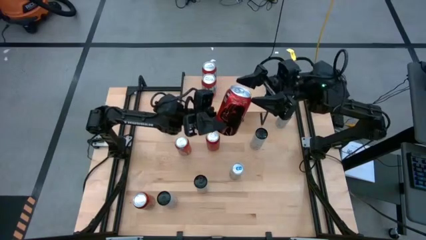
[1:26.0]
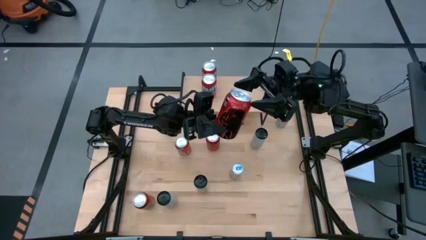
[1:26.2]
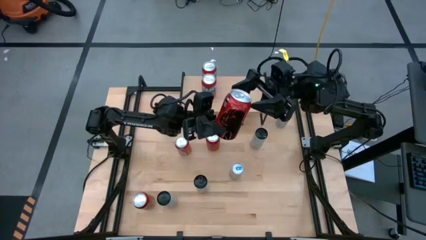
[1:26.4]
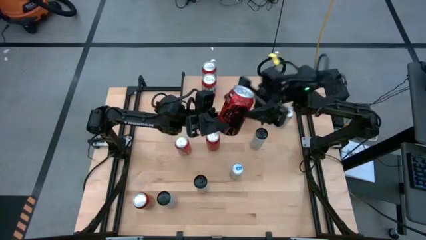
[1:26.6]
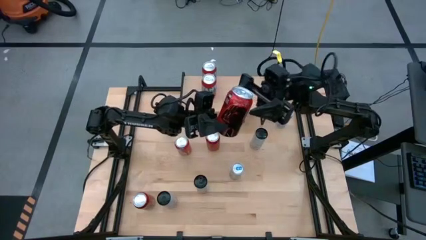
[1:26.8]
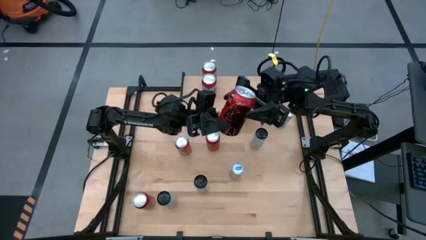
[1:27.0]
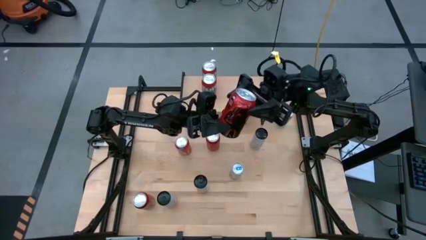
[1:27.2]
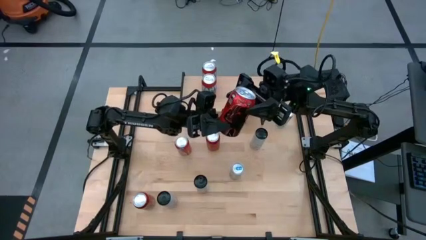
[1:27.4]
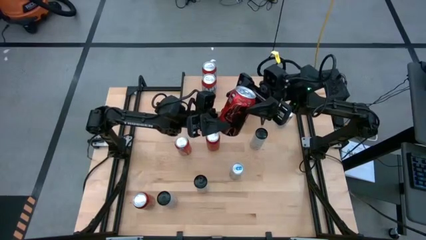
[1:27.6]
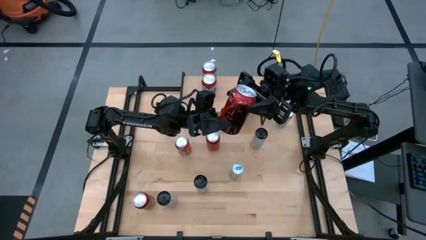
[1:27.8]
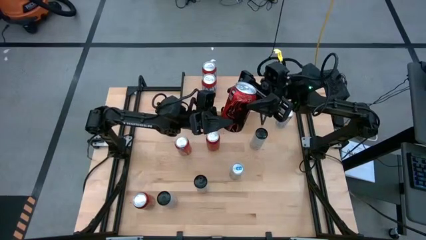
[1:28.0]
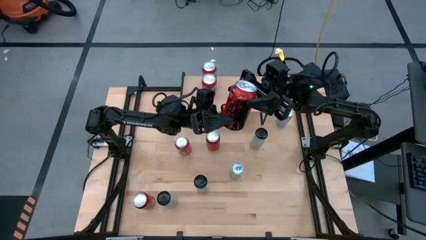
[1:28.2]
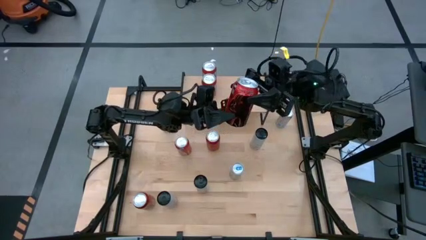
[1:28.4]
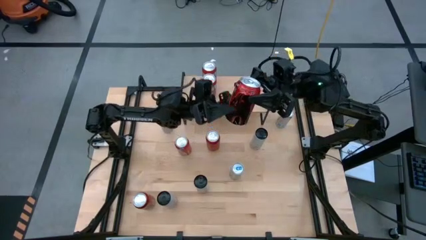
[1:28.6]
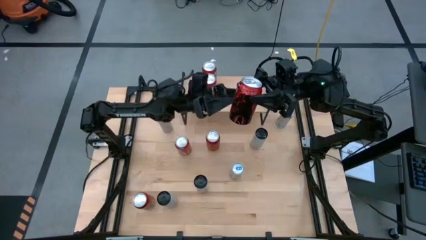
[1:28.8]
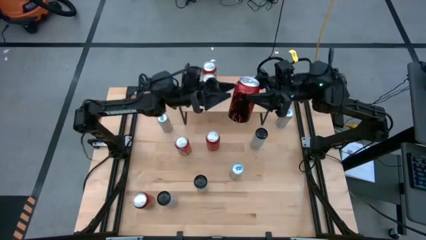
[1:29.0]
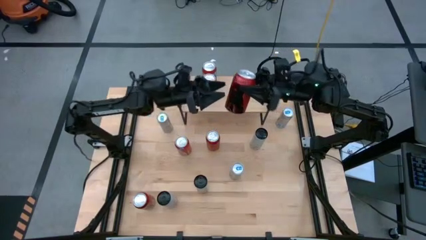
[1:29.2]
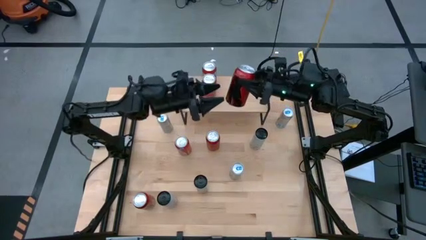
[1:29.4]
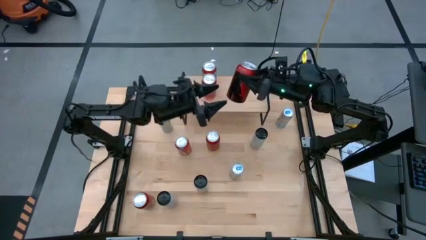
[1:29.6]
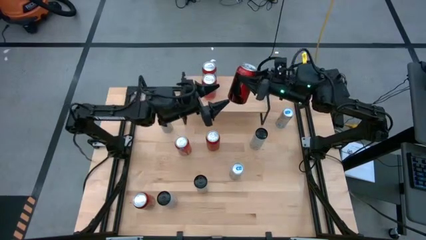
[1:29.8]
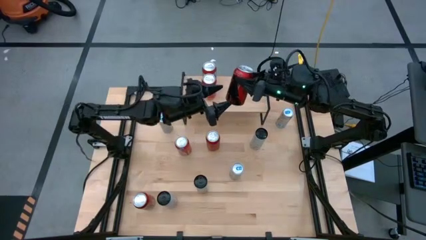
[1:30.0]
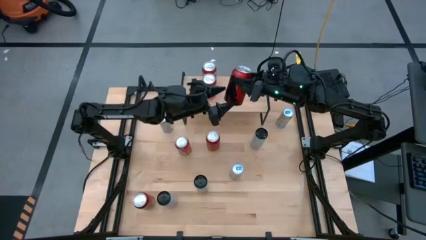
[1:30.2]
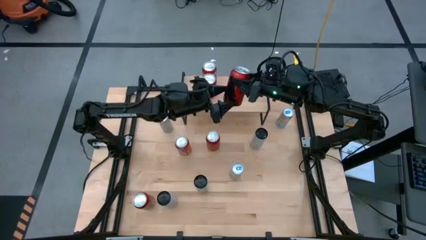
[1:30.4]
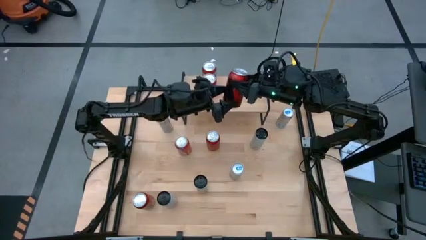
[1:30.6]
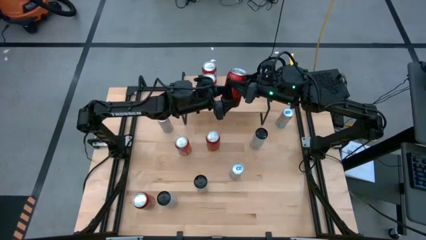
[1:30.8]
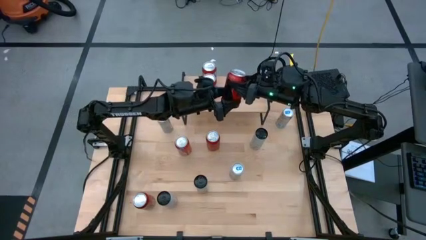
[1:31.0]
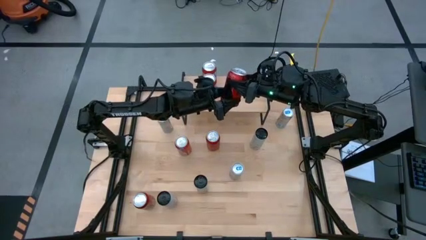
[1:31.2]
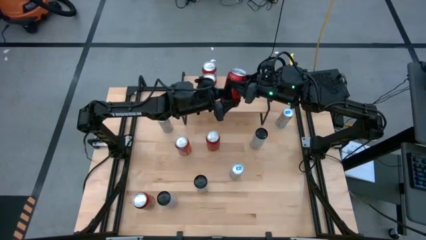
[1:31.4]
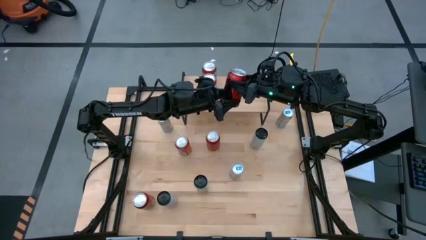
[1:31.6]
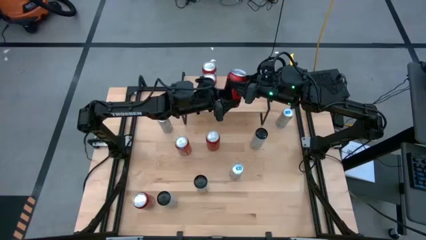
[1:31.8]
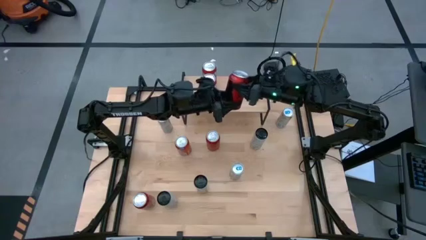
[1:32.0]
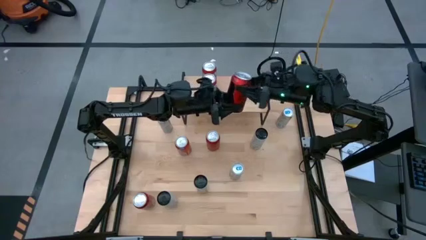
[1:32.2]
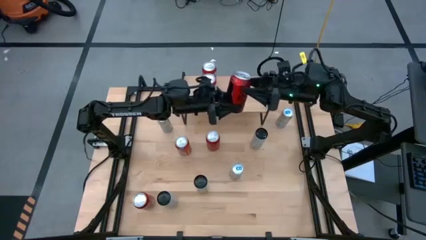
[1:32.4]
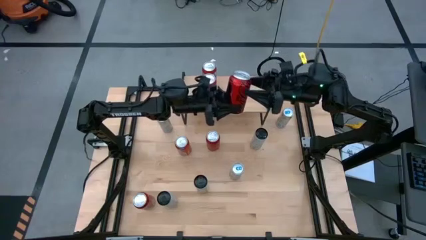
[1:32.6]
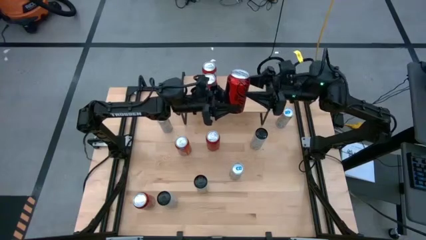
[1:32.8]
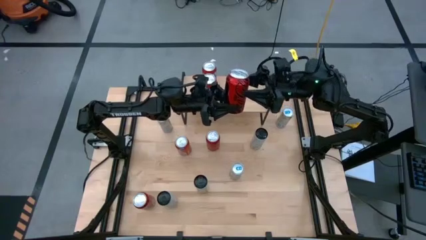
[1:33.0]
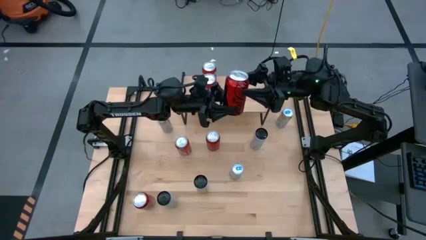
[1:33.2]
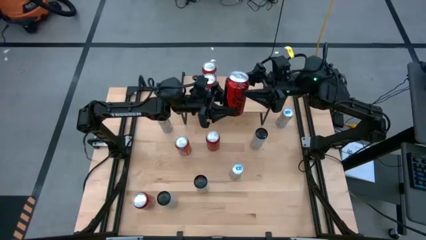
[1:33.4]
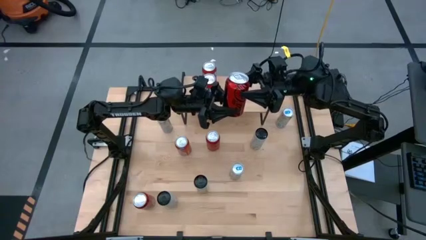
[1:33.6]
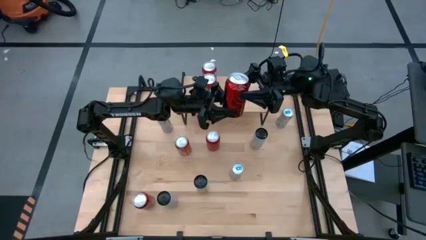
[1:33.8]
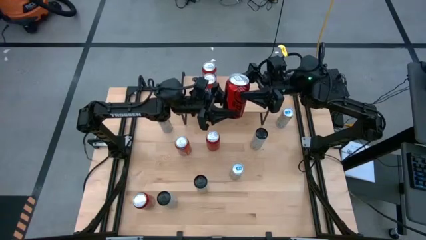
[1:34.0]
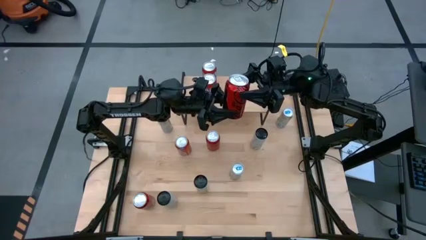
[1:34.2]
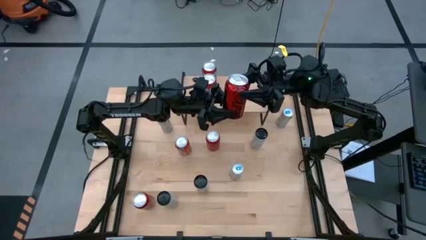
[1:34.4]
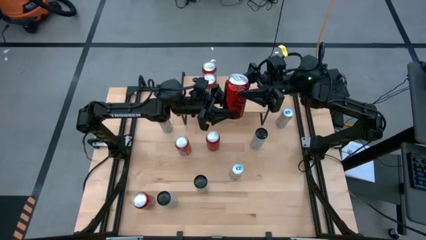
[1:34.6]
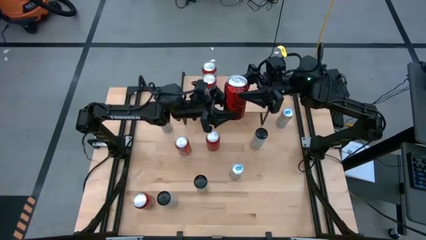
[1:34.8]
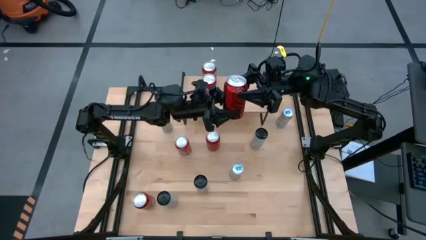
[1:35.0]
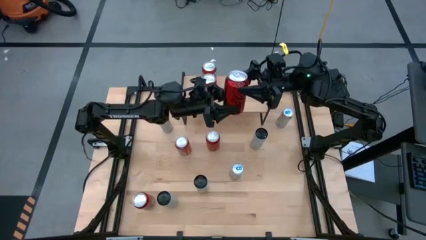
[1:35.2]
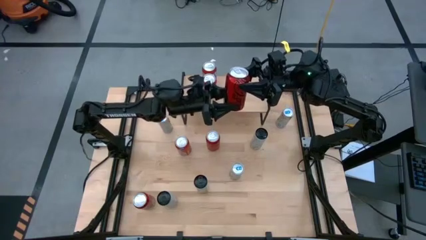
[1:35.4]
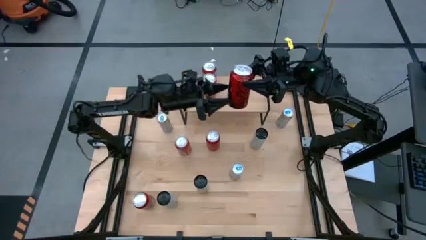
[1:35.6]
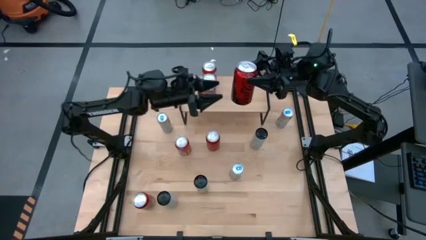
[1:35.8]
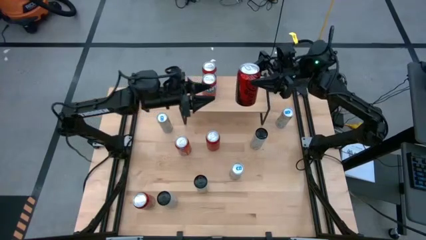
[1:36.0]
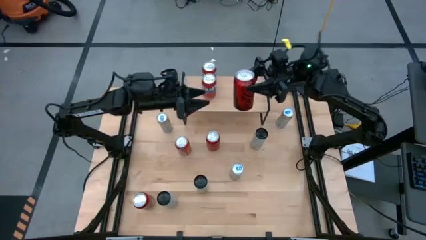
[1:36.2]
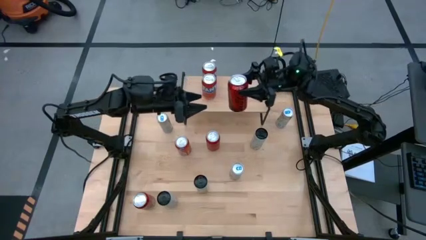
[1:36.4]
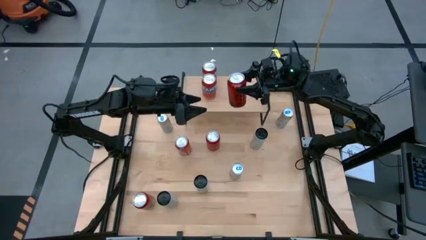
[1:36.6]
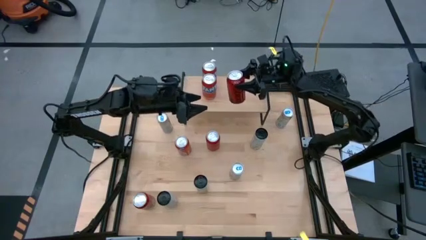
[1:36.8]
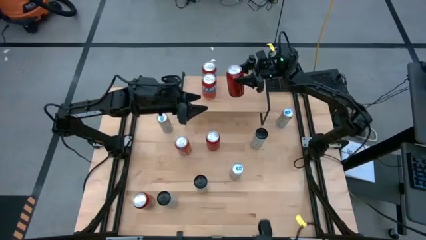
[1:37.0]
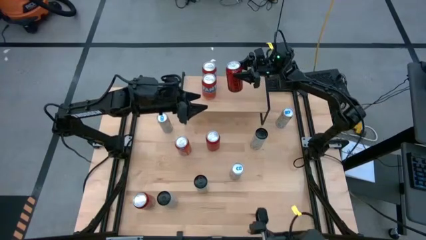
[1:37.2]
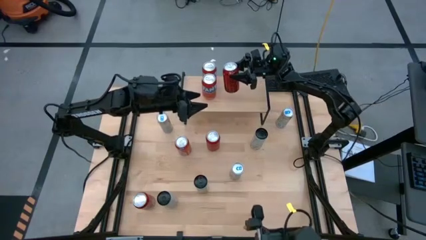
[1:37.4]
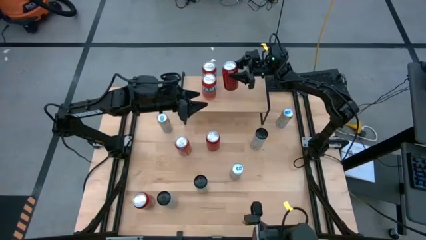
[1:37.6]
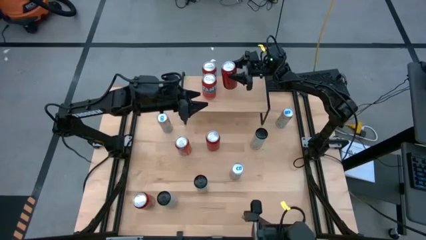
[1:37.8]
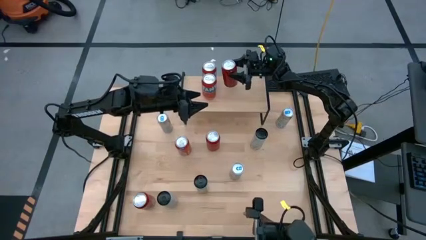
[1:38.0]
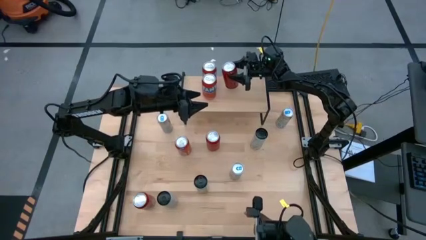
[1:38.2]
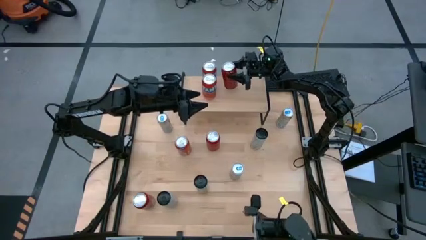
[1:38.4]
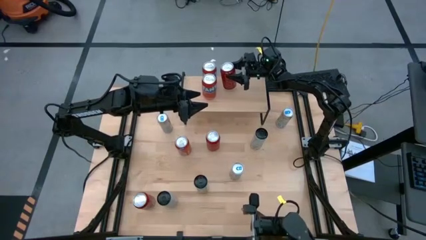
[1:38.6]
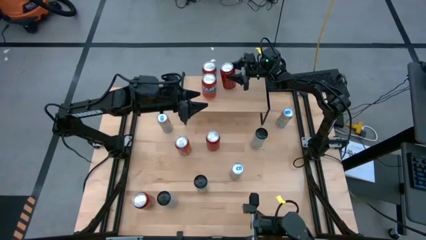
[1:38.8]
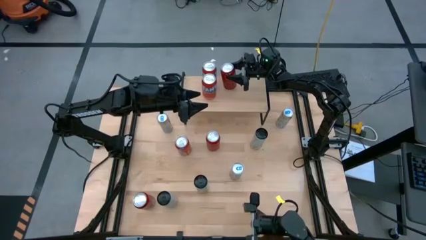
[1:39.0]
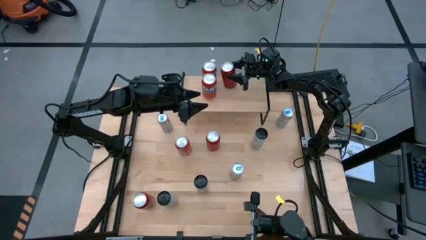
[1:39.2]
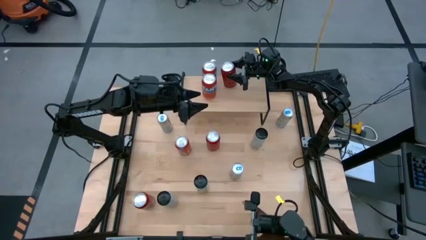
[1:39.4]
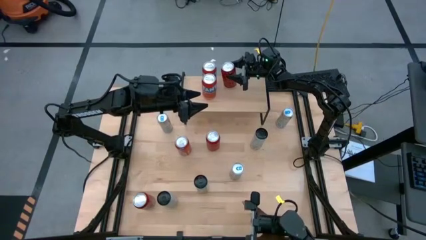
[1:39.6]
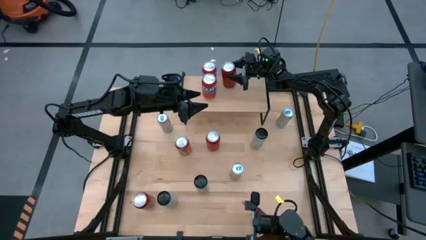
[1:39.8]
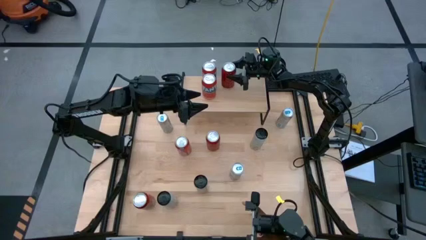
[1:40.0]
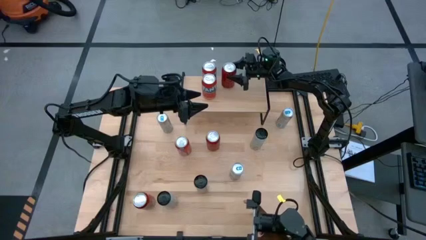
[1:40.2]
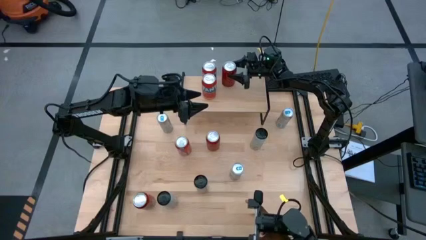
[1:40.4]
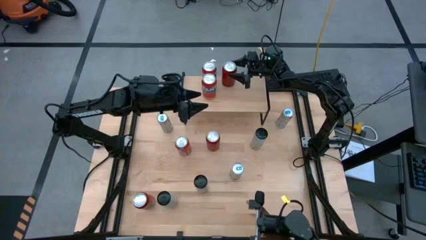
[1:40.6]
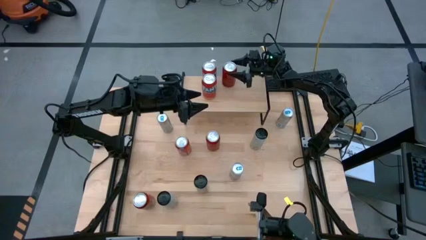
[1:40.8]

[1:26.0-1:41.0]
Task: Place canned beverage on shelf
Put the bottom right red-black soda can on the shelf

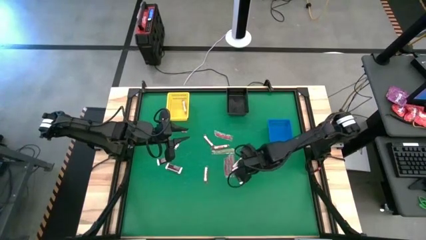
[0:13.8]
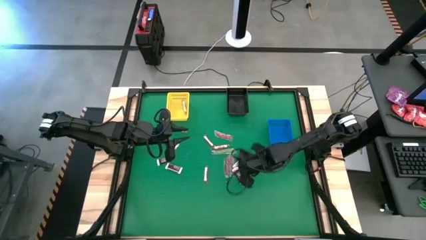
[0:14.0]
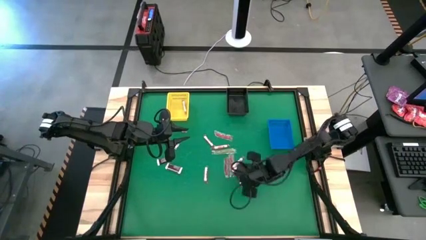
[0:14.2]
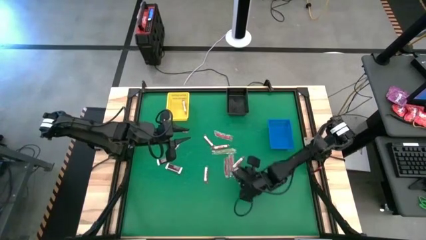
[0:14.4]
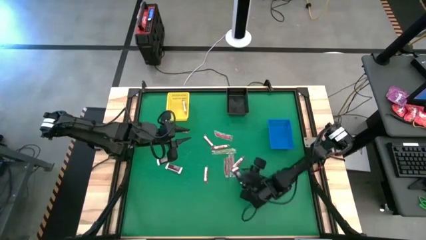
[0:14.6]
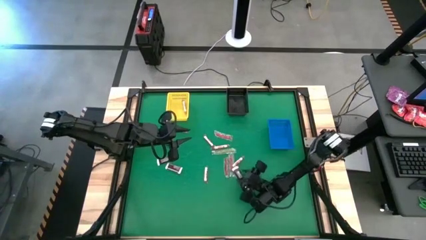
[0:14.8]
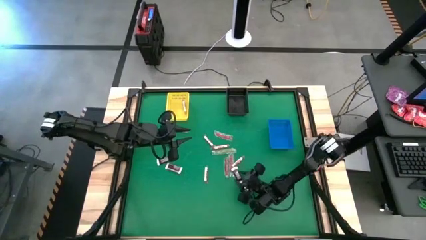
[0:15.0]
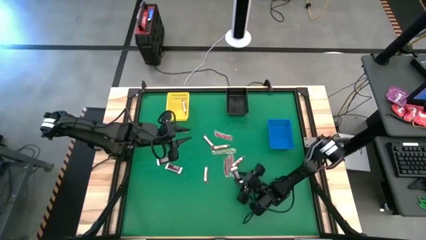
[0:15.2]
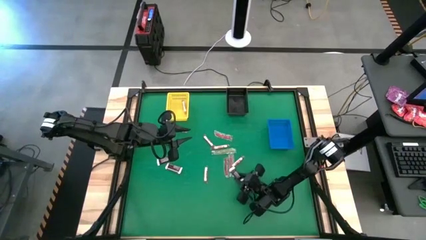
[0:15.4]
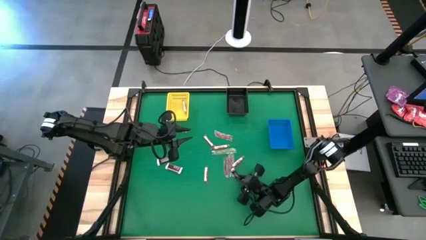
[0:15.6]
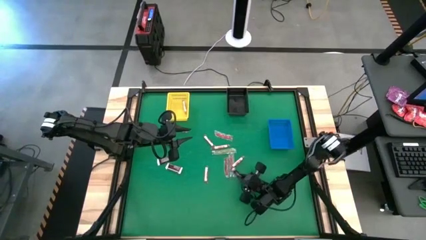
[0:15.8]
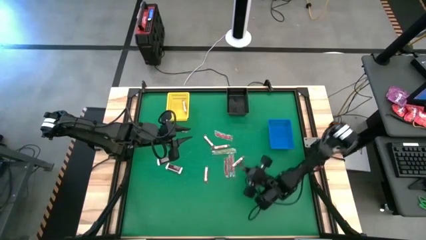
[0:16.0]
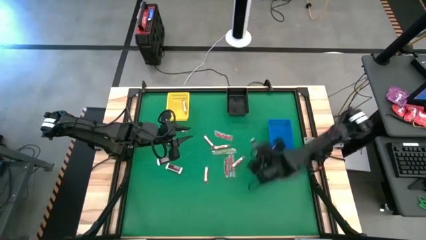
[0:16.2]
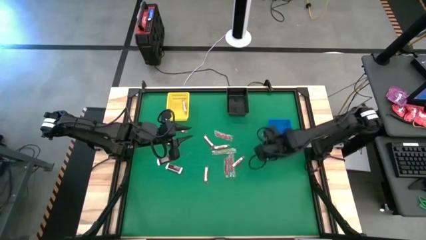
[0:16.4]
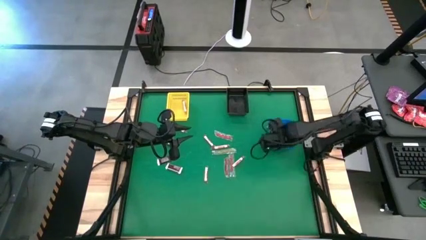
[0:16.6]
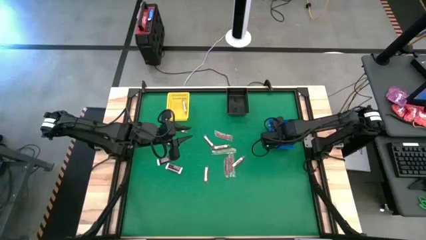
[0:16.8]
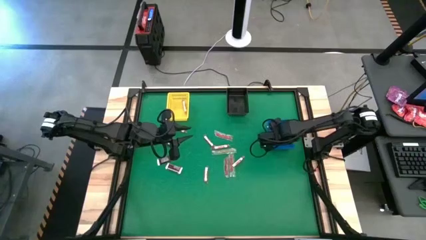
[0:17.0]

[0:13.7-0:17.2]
Task: Sort candy by brand, put in halloween buckets
Put the brown chocolate into the blue basket
